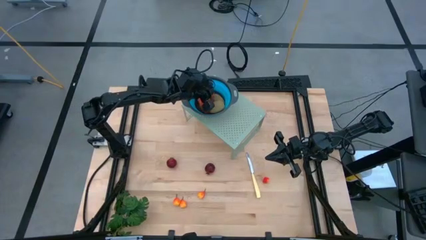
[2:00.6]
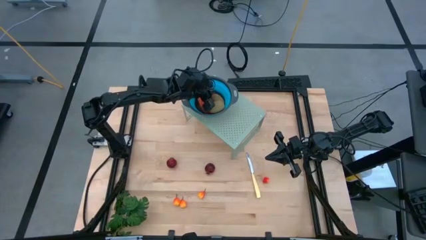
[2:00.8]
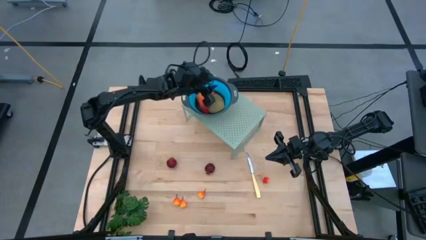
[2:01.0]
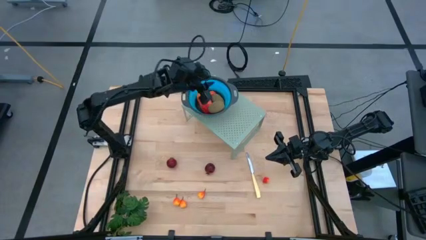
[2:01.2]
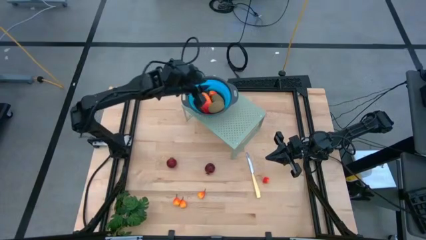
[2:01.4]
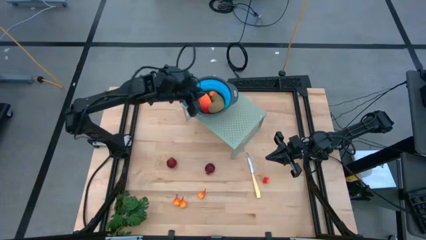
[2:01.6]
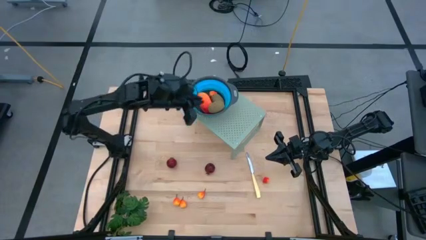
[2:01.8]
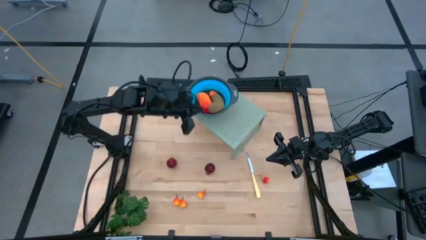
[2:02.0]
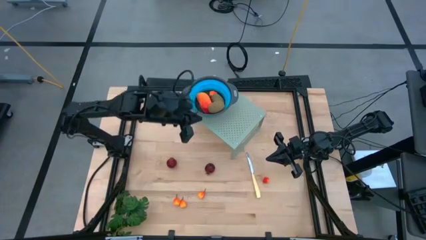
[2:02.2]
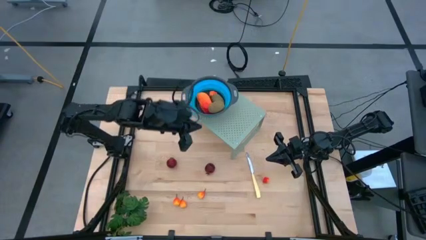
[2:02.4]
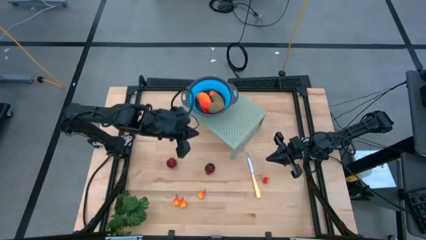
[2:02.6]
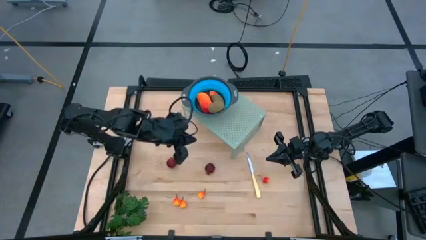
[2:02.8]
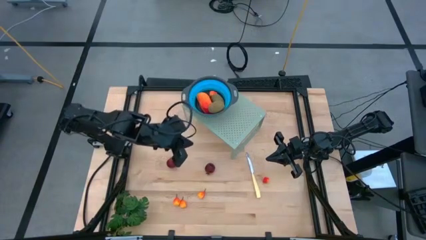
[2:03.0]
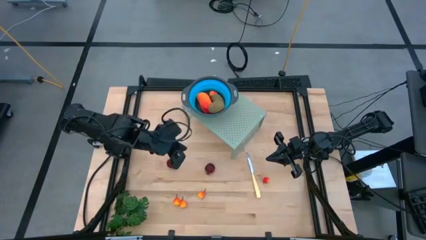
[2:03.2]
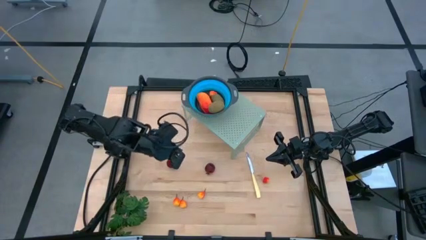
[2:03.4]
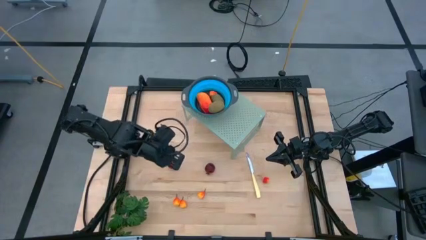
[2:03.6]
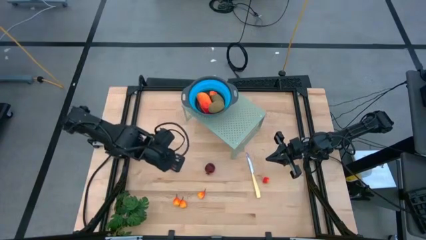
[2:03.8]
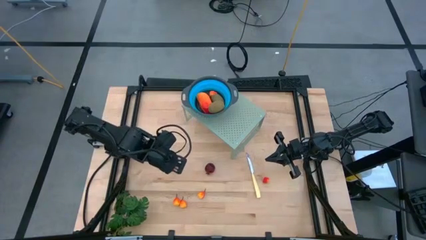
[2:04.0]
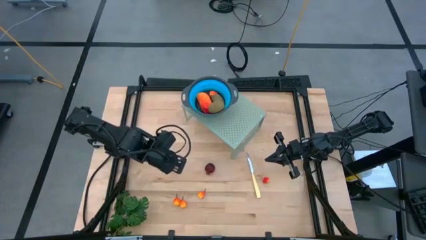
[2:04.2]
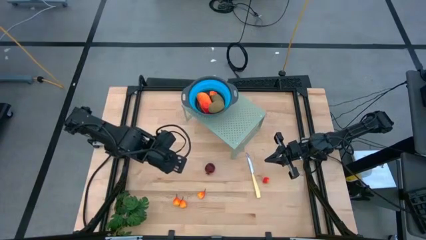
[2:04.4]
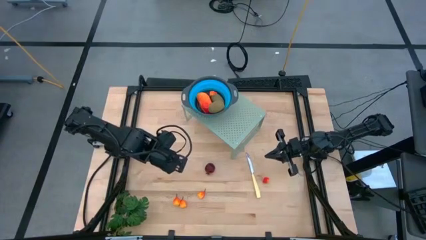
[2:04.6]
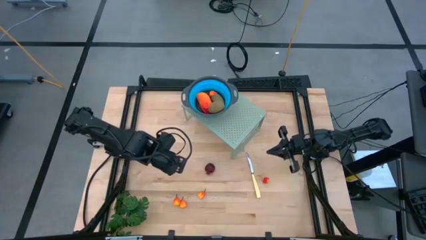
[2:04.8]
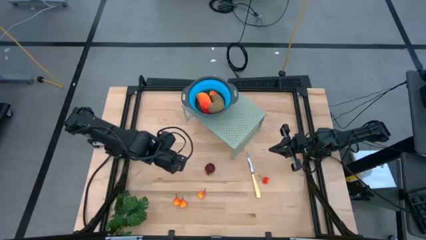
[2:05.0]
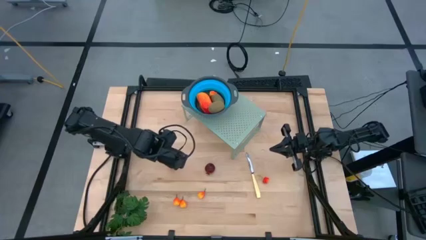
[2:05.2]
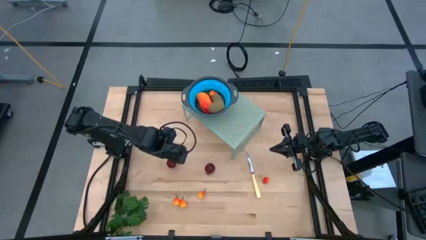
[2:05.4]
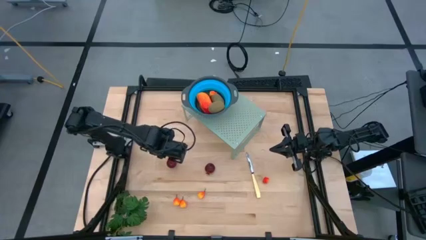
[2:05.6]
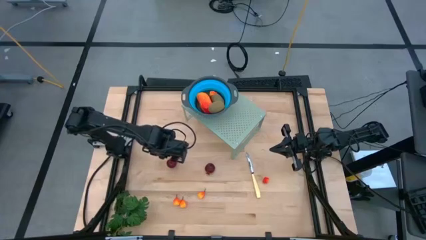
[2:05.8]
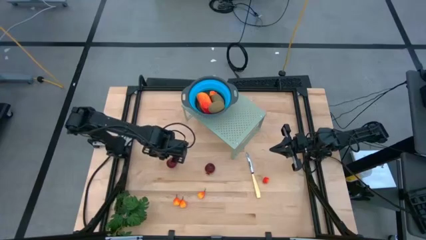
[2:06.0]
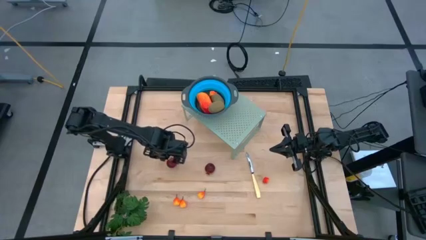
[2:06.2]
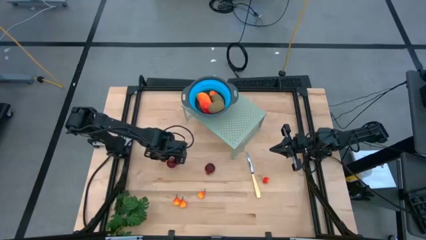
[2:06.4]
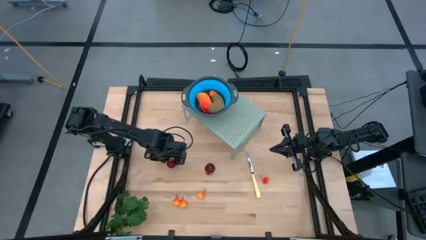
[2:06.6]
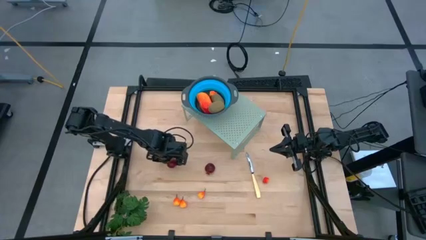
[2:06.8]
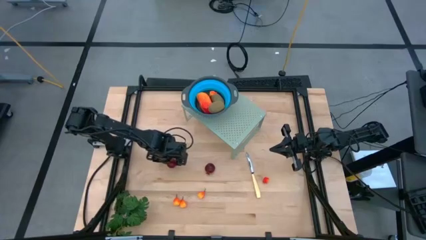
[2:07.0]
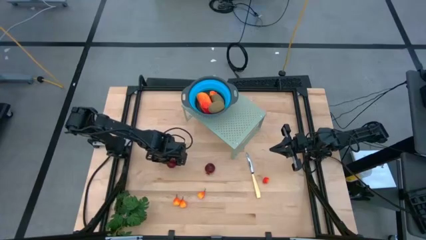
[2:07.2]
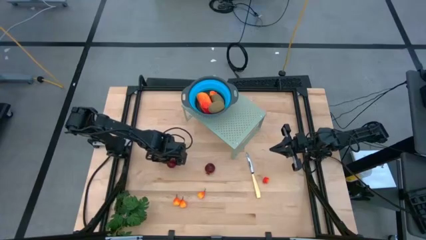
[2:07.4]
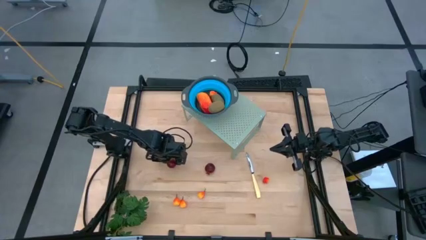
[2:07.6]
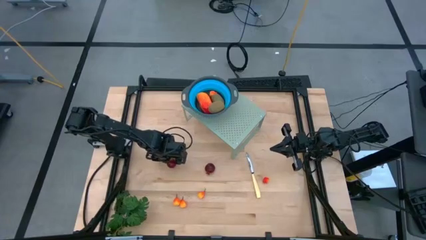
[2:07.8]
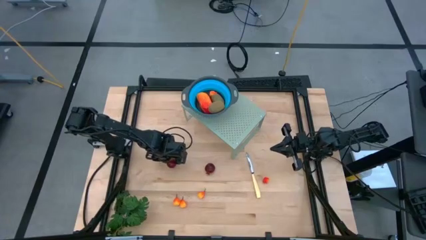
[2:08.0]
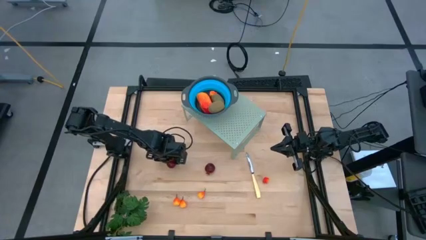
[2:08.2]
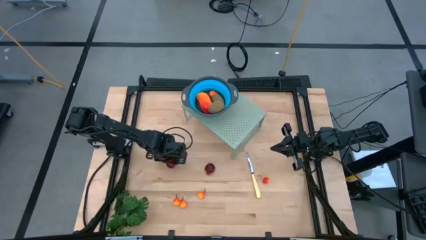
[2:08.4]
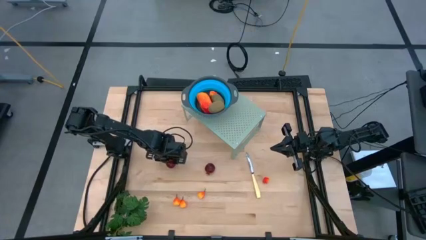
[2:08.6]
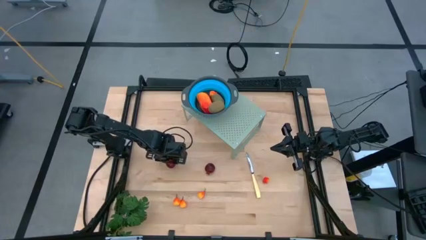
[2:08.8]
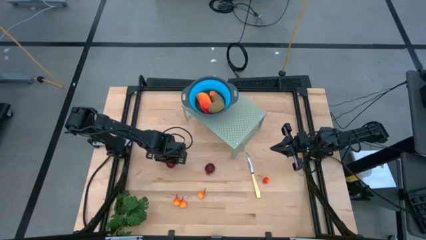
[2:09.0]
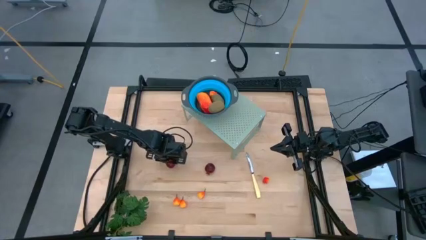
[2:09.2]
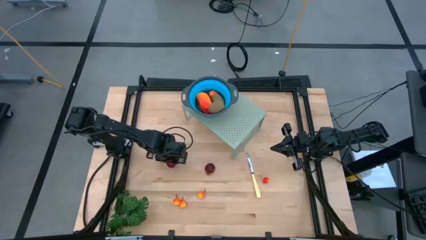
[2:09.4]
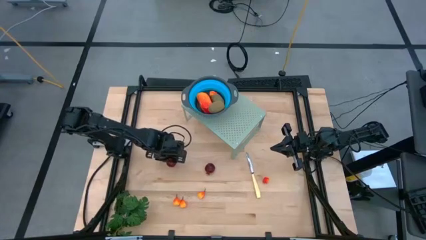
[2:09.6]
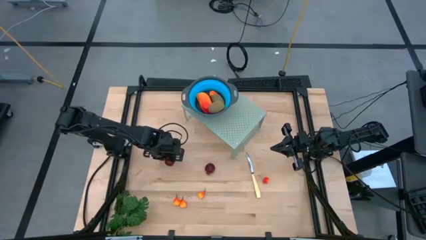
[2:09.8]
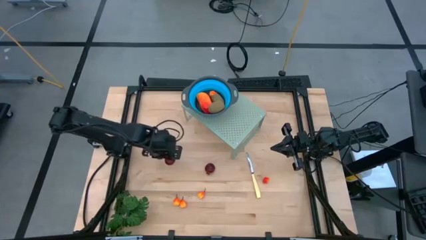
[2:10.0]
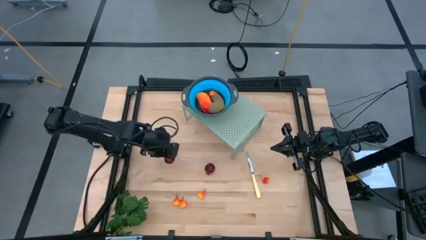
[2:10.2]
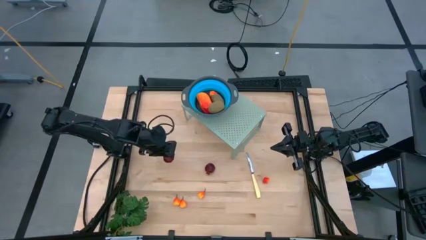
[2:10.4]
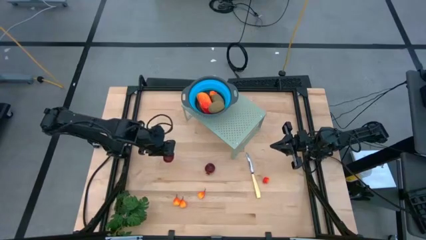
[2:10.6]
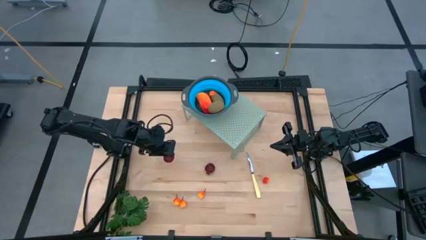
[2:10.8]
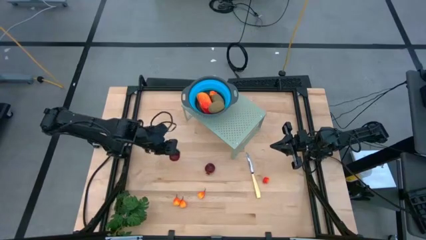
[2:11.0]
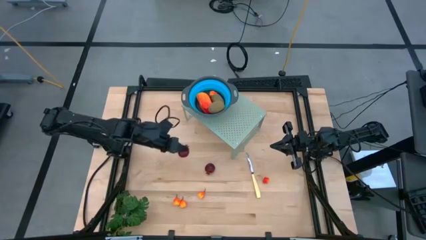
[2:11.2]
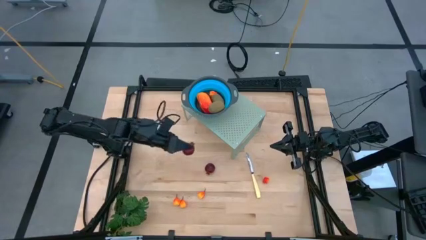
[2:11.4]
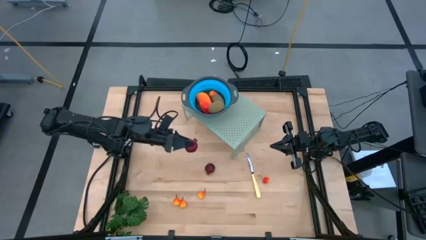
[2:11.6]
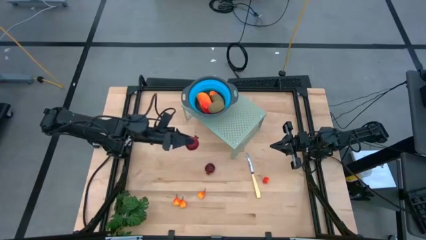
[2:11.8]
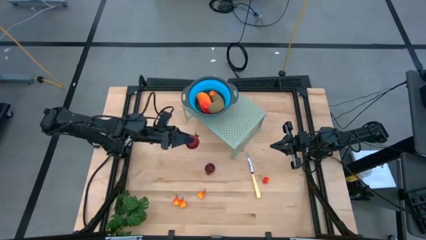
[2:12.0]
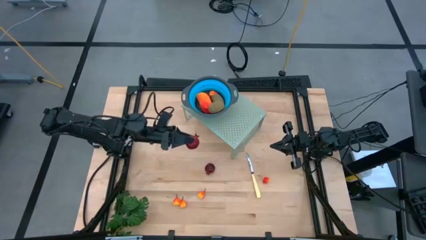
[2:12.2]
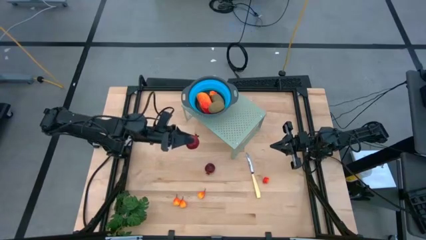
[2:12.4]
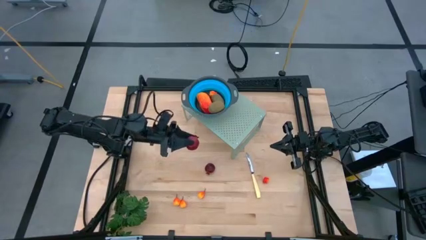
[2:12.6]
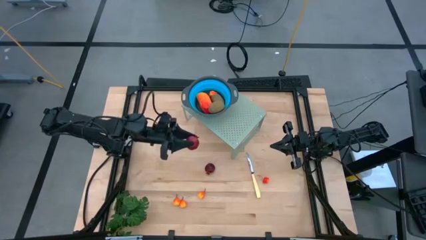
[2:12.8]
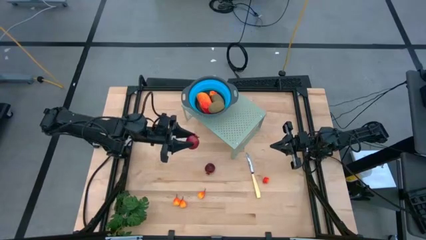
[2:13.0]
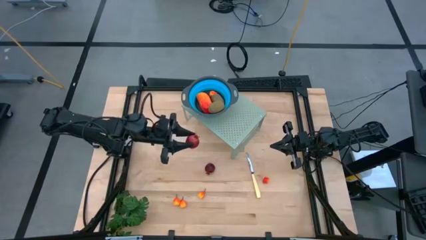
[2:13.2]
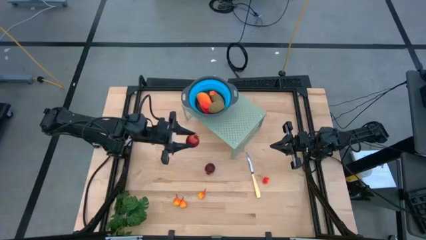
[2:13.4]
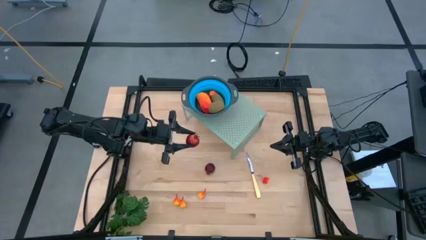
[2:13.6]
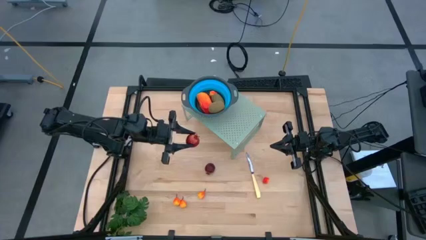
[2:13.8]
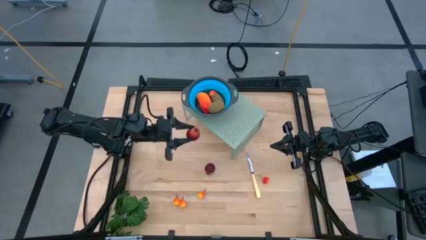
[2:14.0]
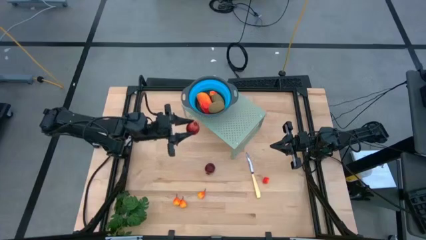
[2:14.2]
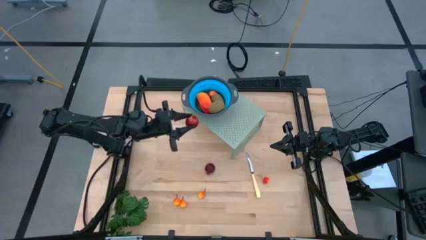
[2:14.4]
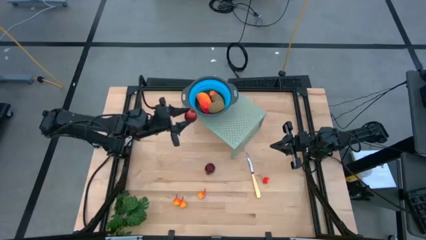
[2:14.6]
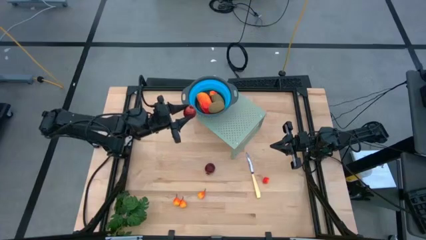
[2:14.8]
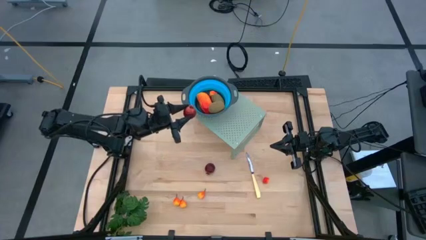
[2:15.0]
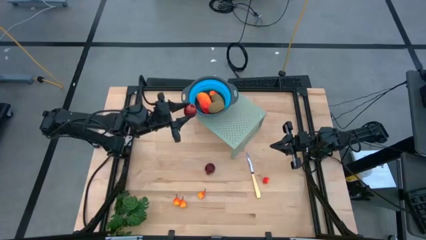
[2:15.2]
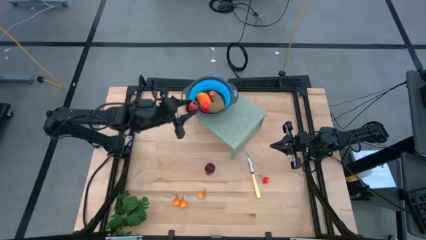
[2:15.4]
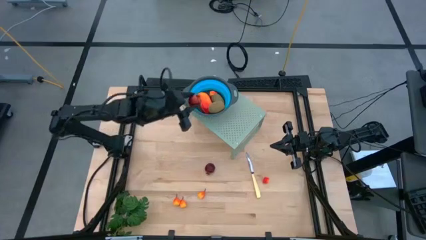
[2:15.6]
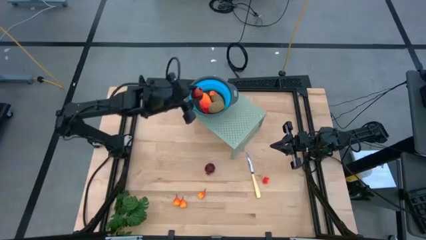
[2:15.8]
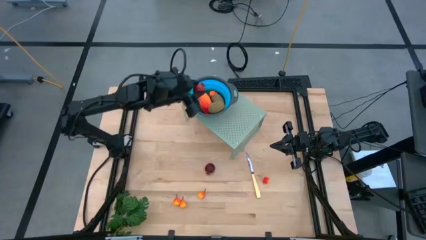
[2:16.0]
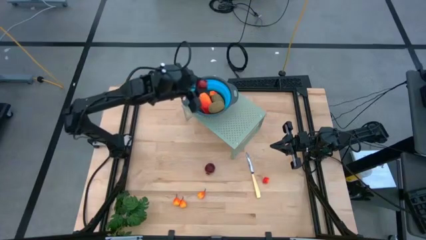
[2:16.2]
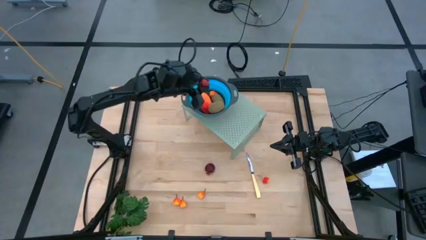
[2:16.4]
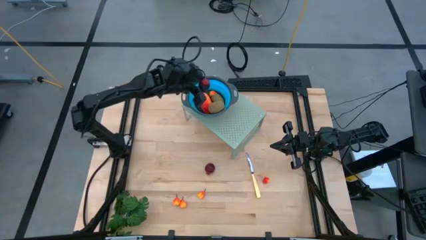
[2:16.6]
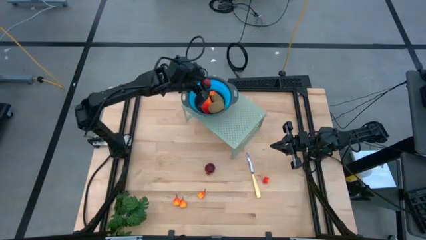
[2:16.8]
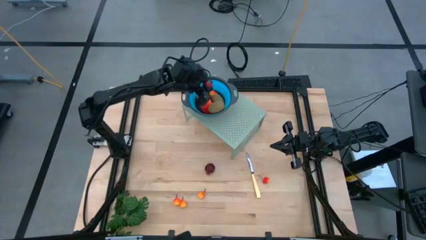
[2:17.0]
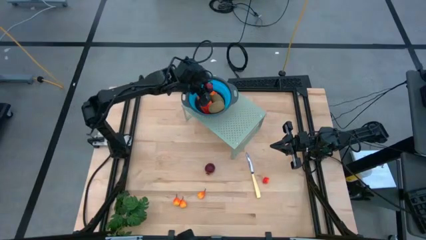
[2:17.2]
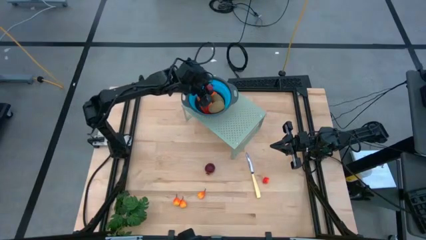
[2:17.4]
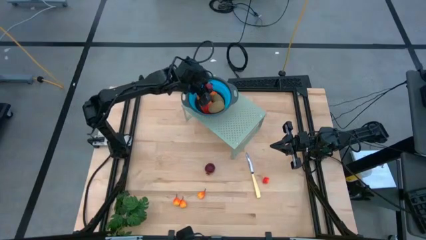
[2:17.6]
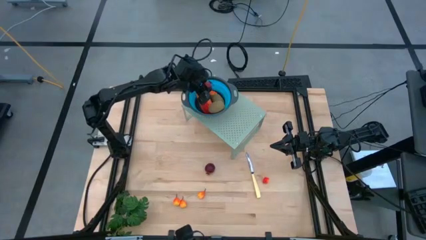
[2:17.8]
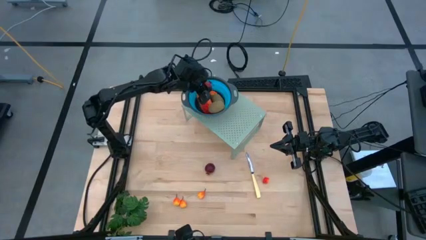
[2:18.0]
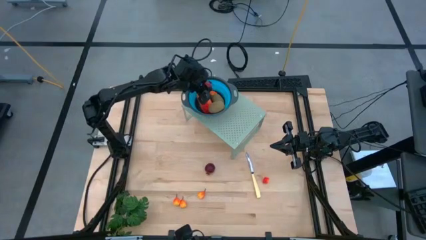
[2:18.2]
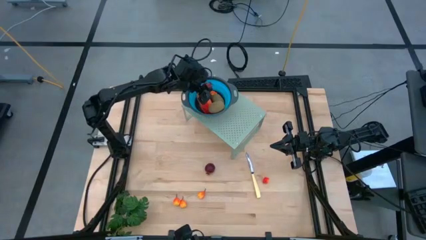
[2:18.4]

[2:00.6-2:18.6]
Task: Pick & Place Fruit
Put the pomegranate into the blue strainer bowl on the shelf
